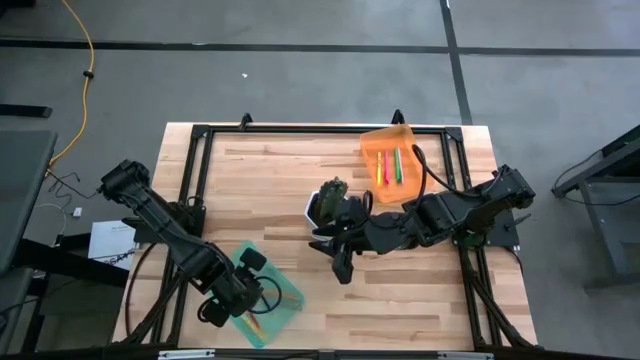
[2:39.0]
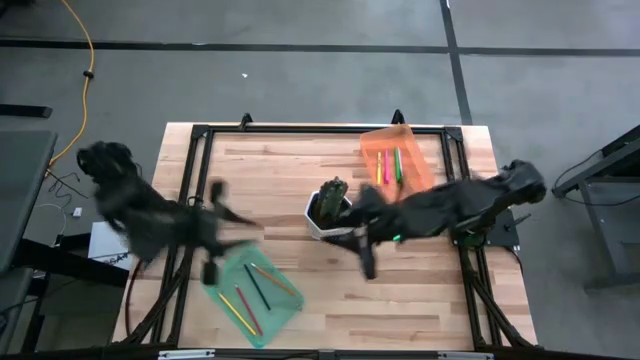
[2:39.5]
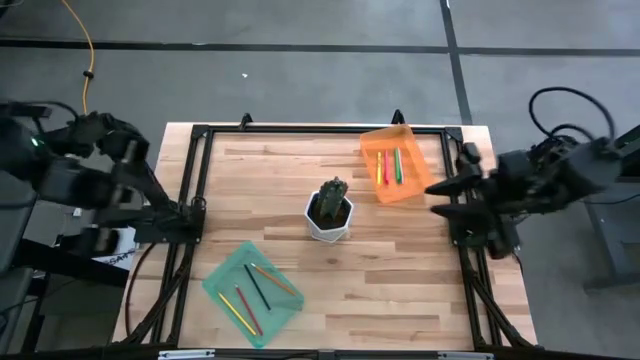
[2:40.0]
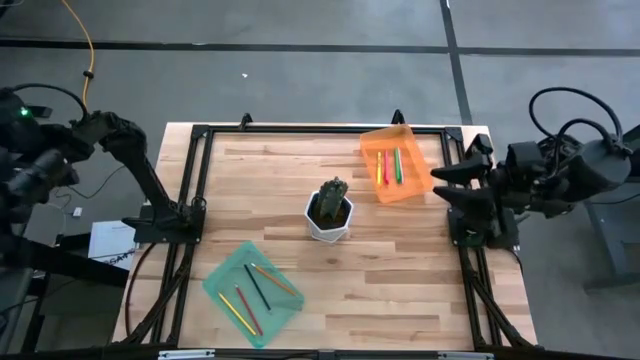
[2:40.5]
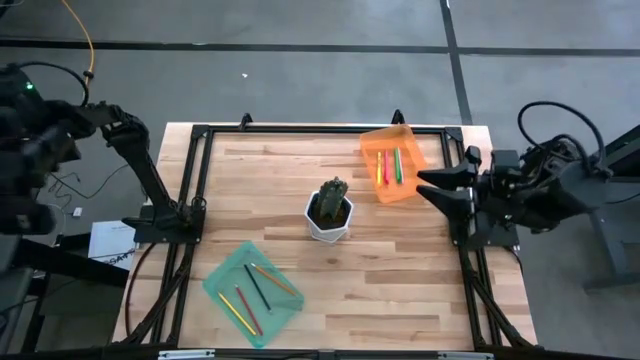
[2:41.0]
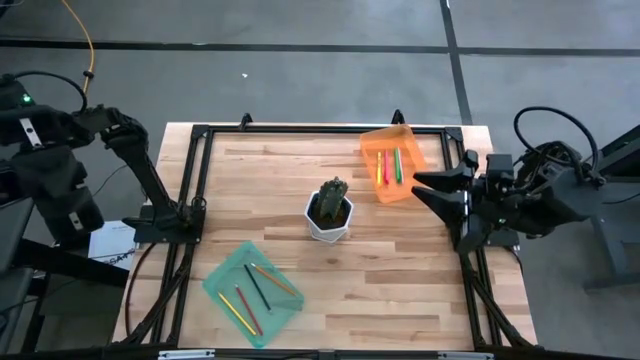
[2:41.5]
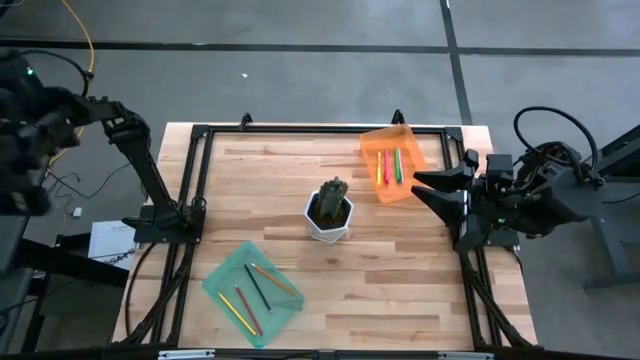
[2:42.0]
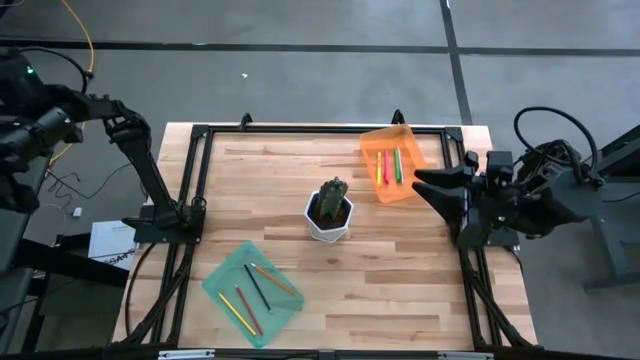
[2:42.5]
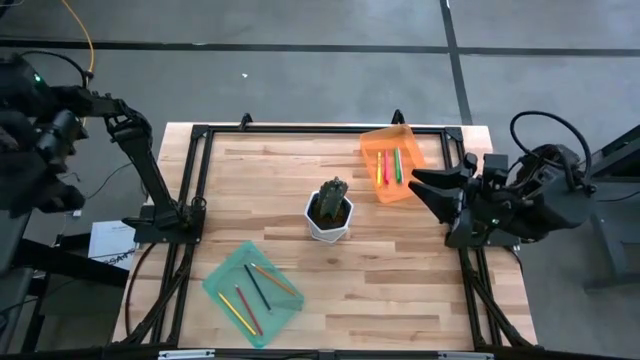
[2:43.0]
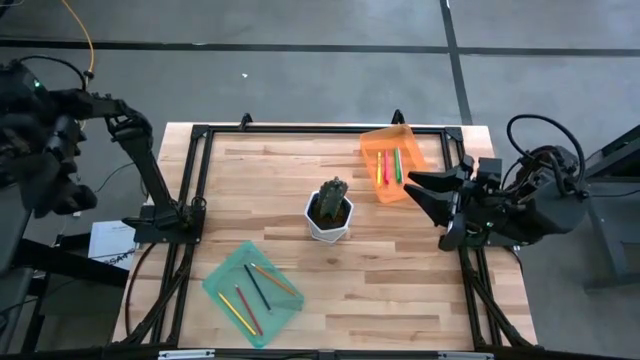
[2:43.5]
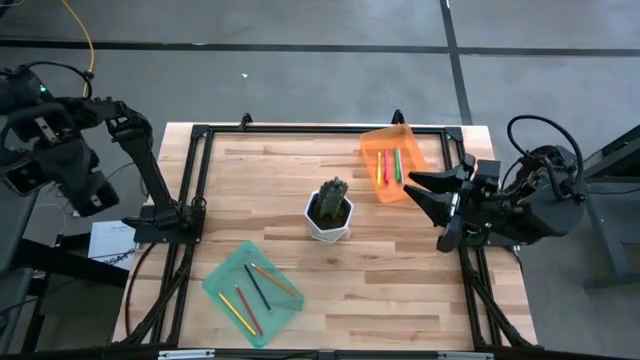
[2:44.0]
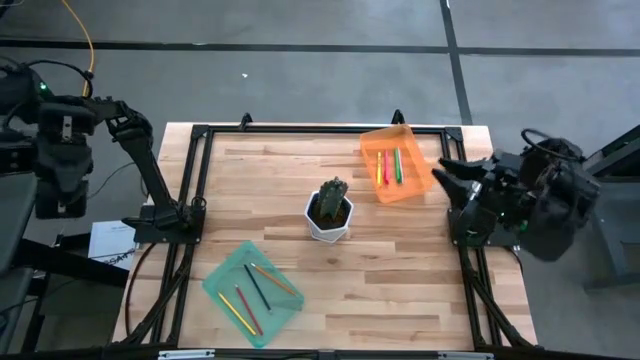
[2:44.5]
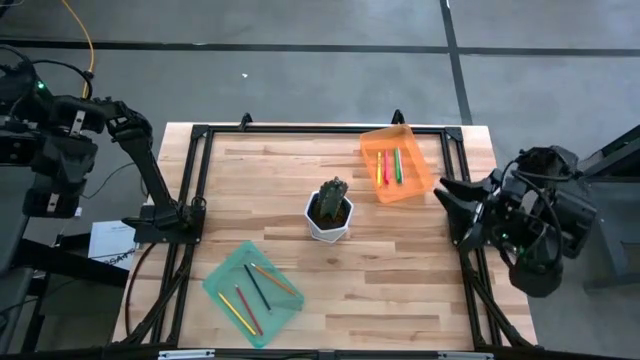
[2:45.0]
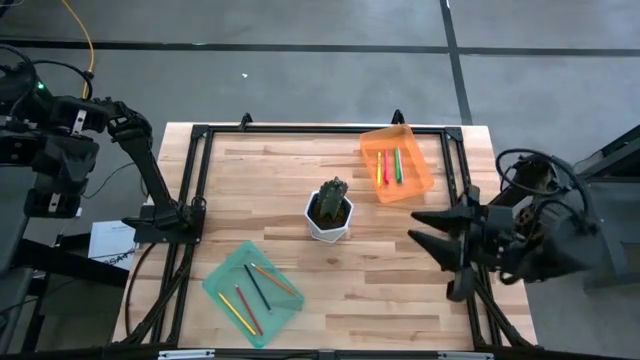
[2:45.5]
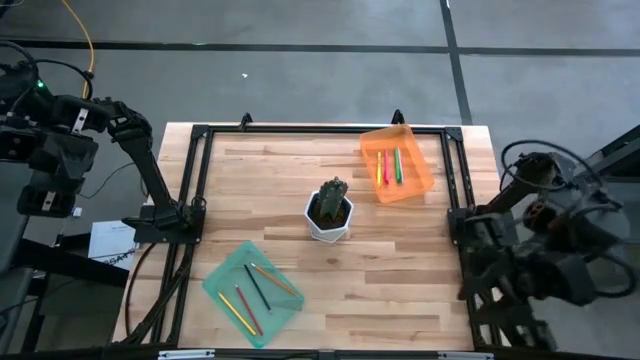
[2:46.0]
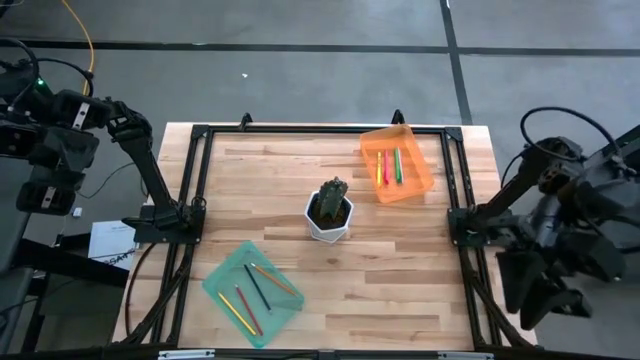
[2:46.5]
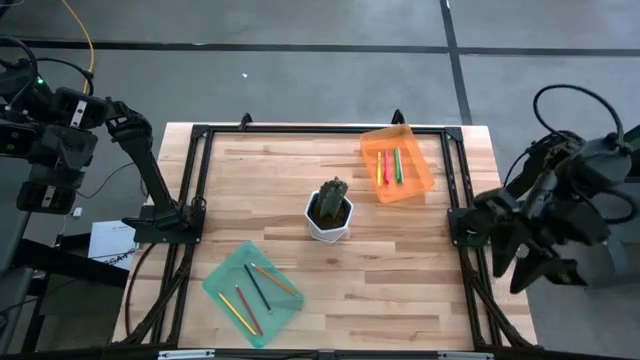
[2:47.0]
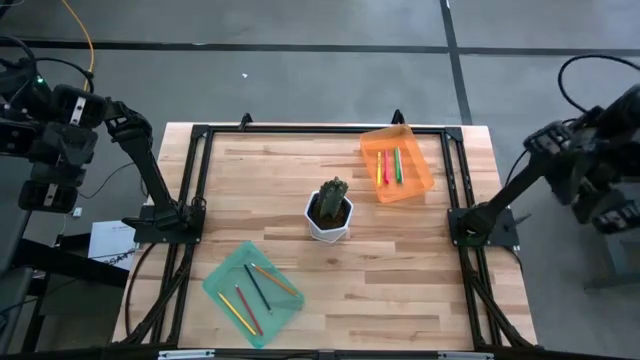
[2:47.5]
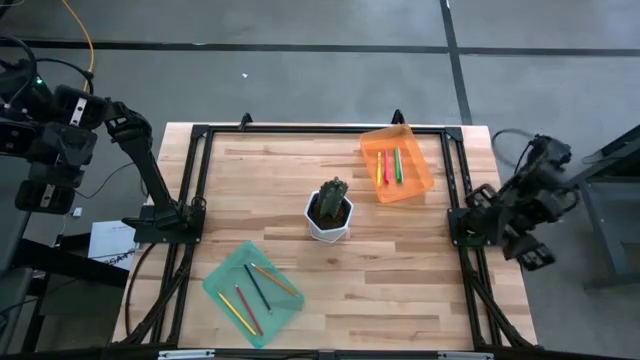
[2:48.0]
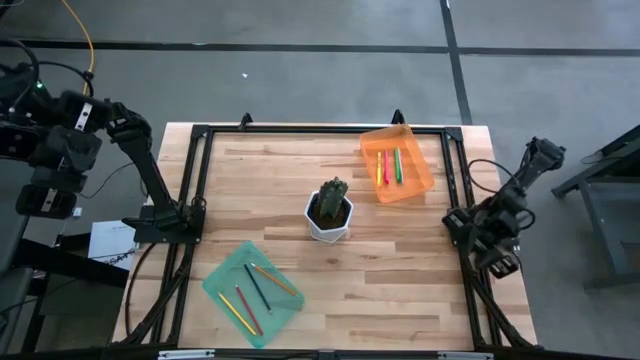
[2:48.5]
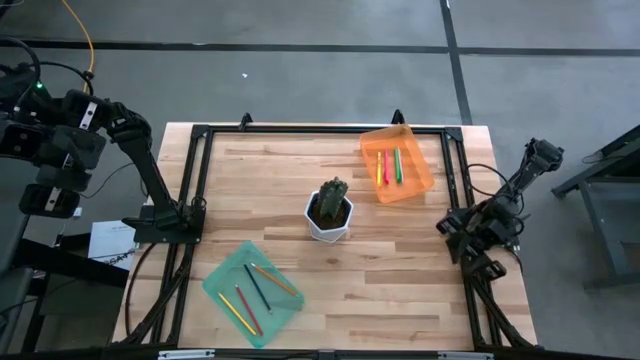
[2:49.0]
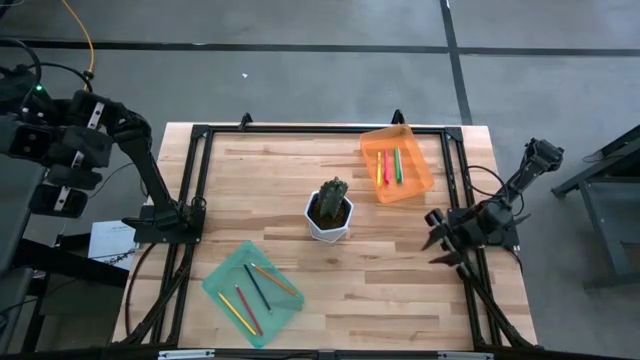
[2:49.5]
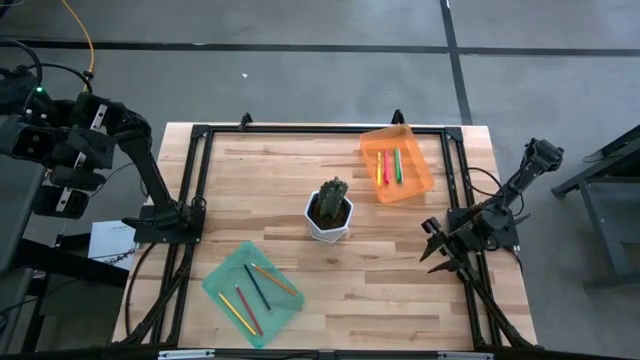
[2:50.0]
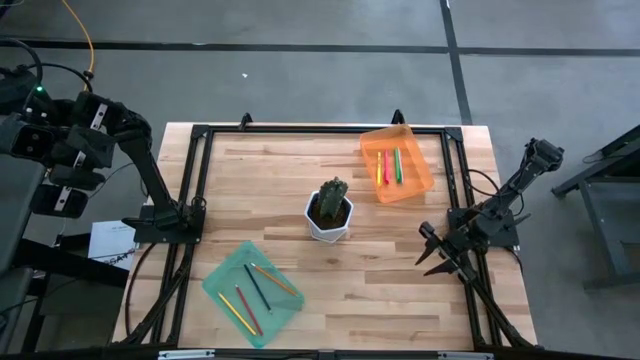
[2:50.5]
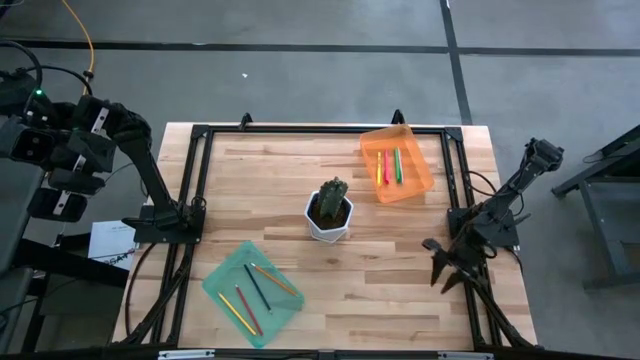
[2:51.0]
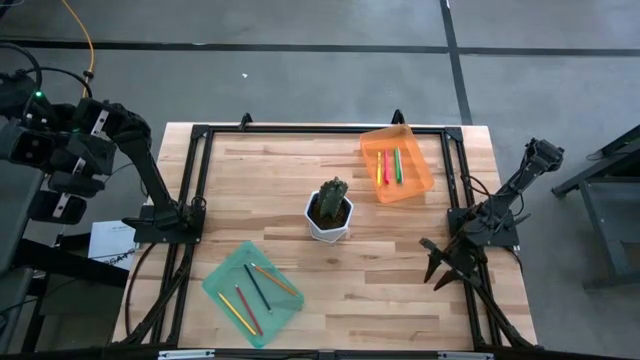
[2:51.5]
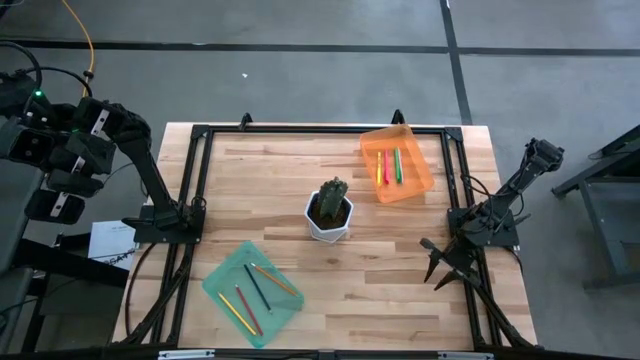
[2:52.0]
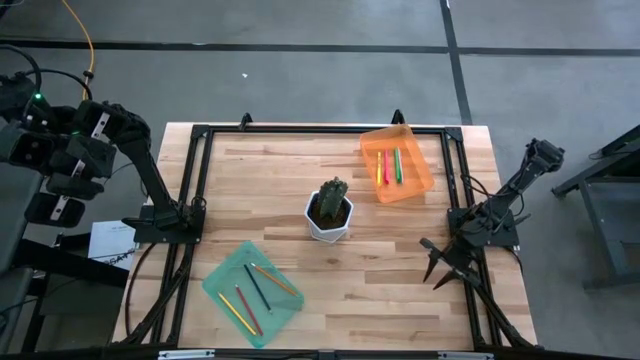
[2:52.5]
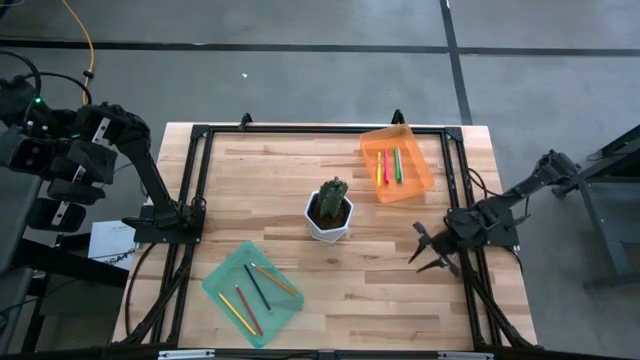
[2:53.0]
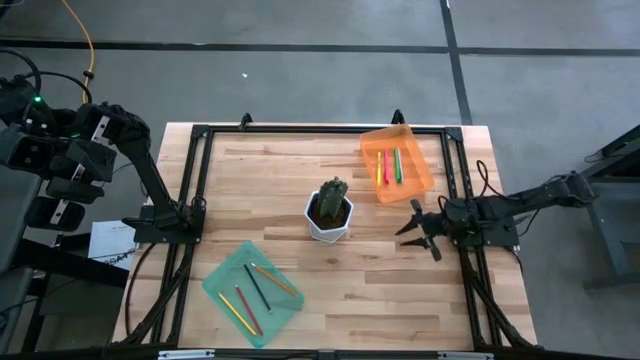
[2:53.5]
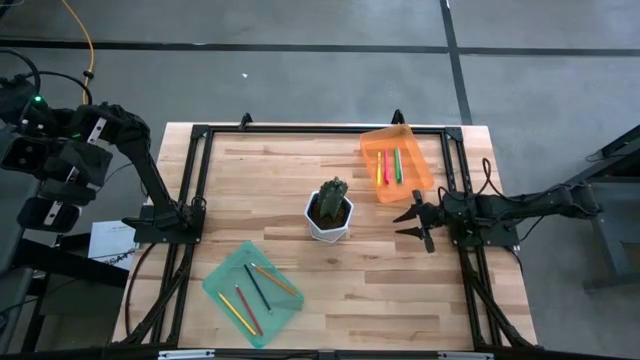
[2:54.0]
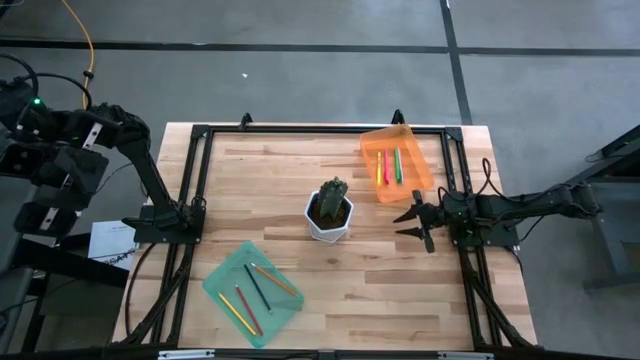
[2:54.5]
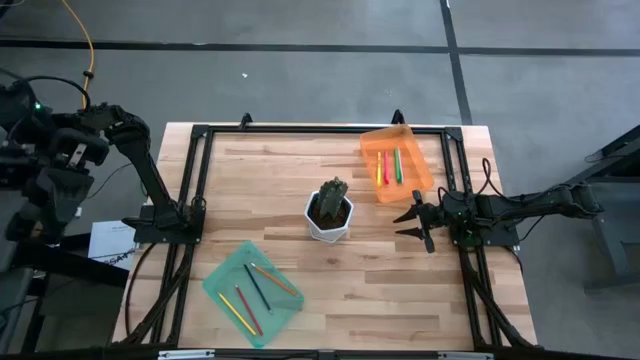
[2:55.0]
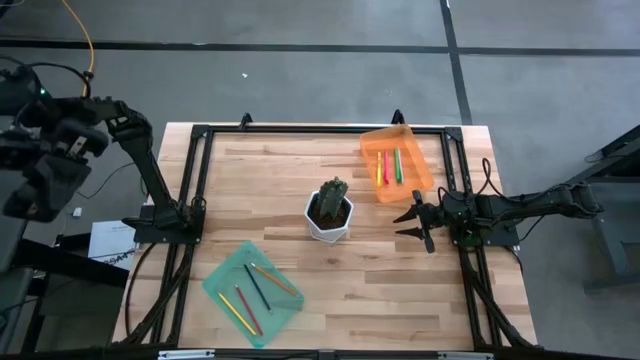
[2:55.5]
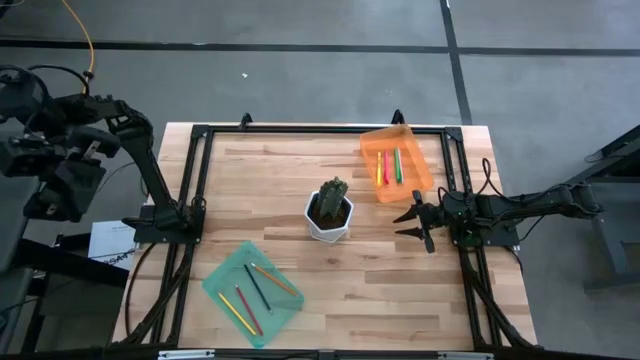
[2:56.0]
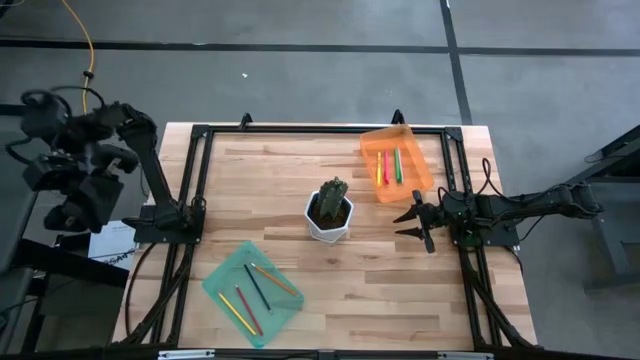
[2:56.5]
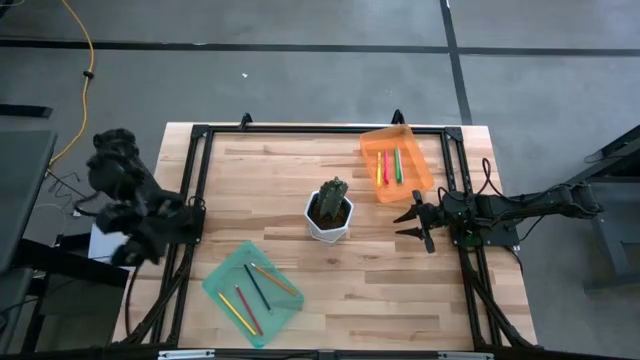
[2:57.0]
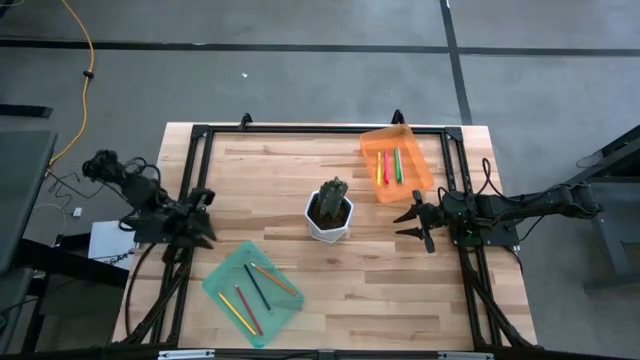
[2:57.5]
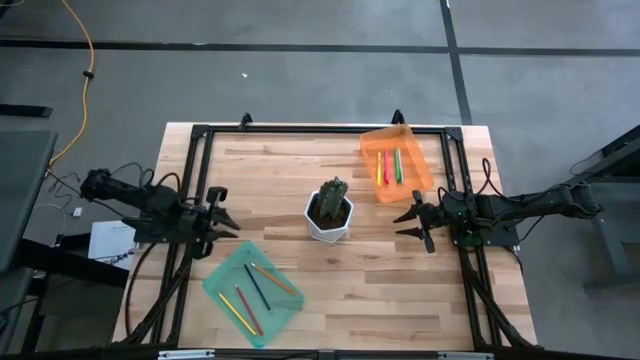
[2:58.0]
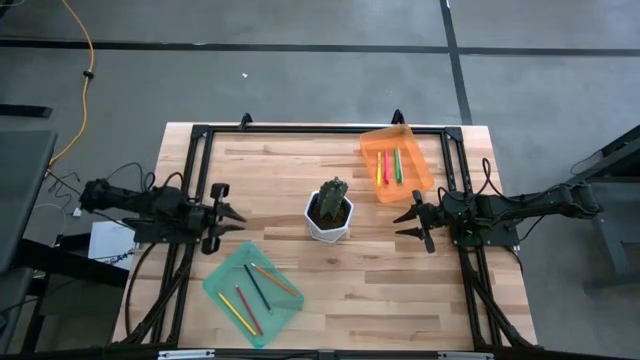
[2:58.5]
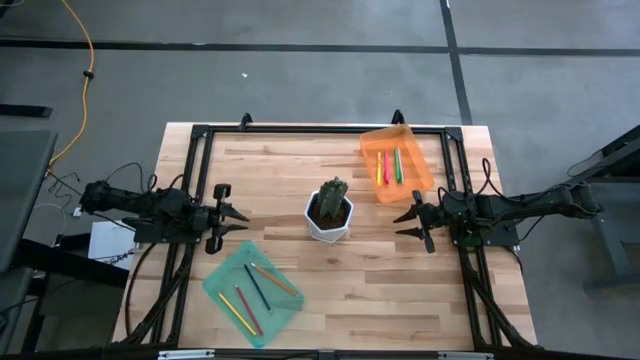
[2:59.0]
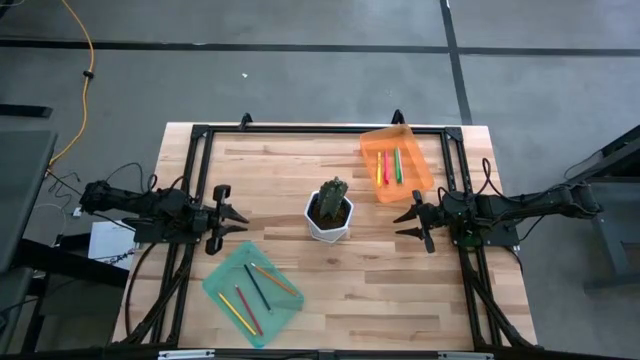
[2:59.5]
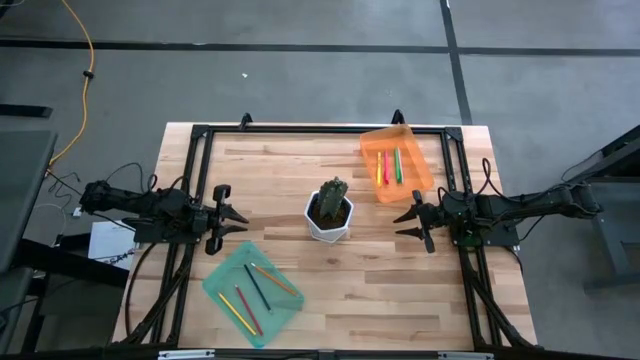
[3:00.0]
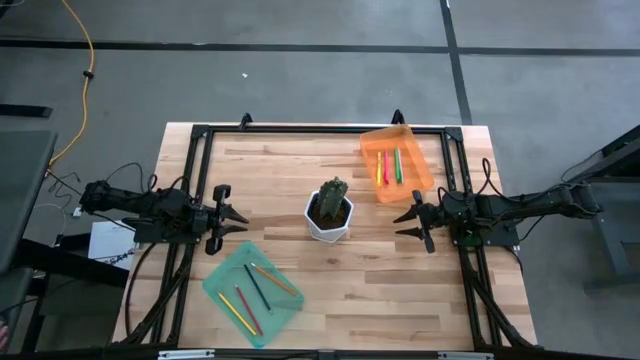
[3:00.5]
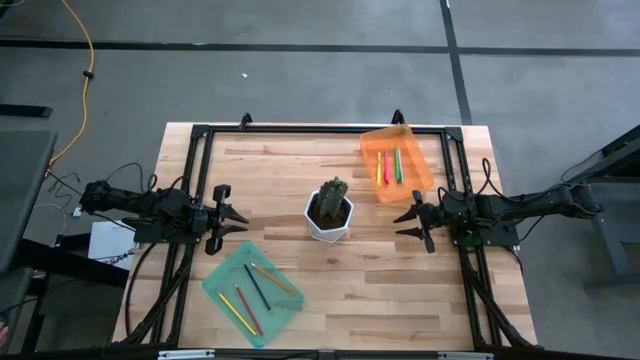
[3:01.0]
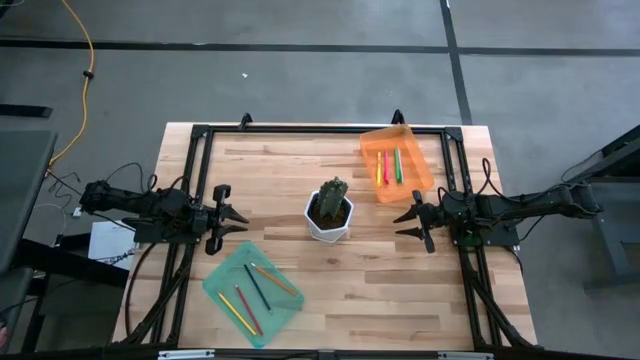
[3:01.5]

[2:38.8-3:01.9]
Task: Sort pens & pencils
Return to Home Position
